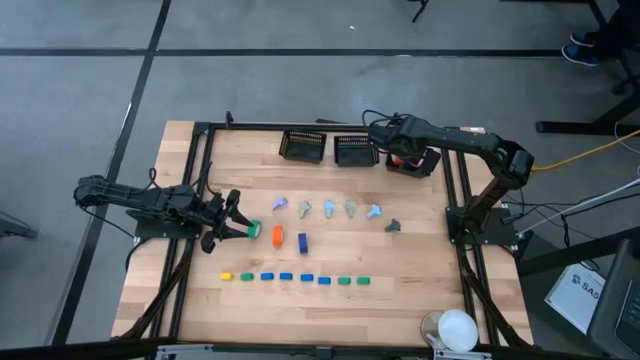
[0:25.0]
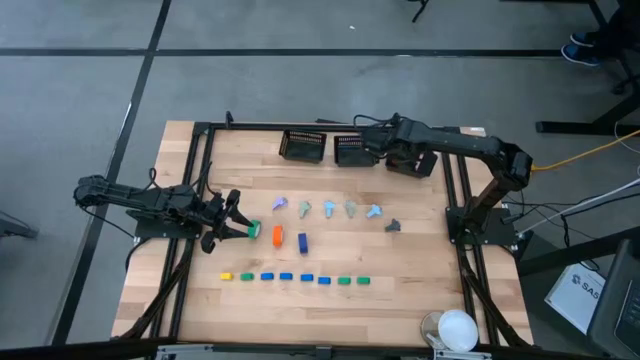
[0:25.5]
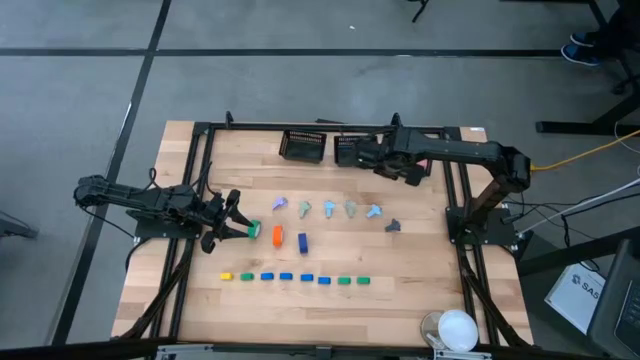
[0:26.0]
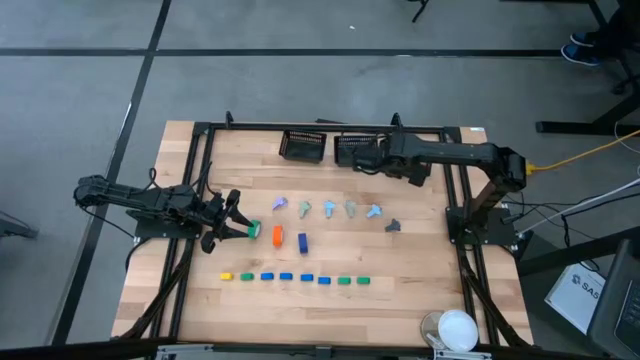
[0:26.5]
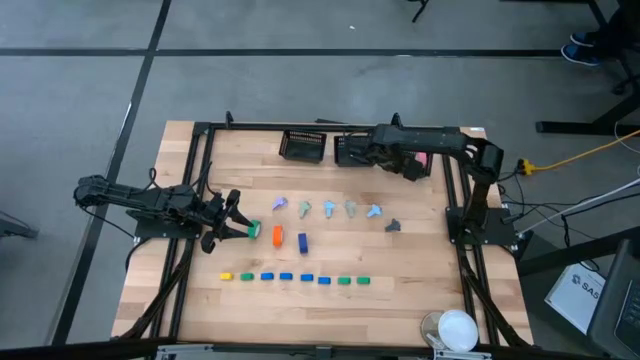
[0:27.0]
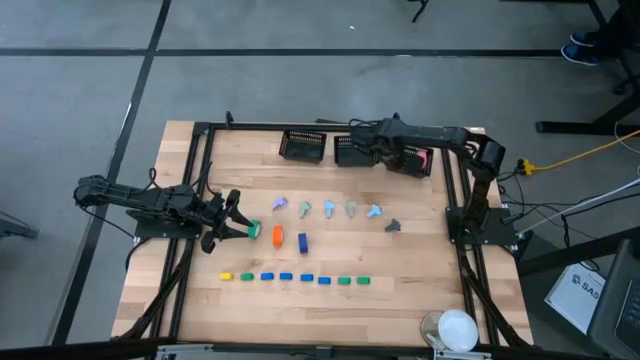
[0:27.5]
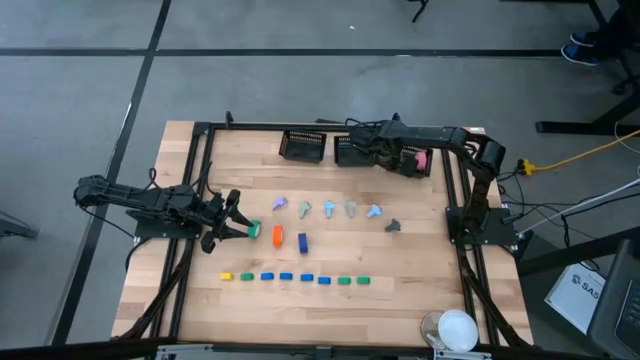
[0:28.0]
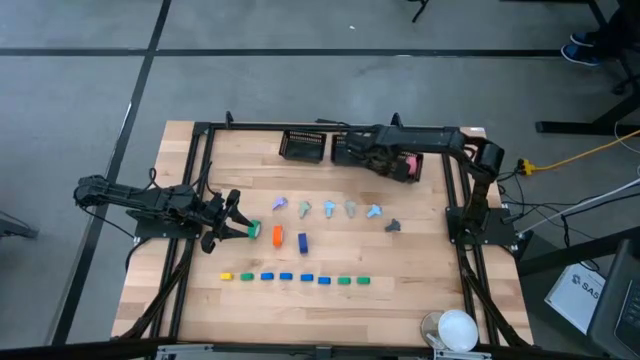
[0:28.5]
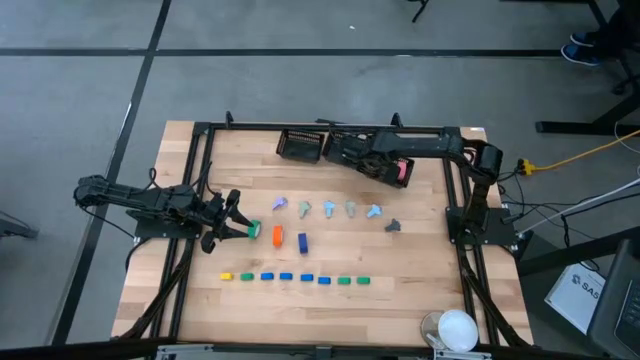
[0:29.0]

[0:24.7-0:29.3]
Task: Pick and place Stapler, Stapler remover, tape
Adjust the right black bin on the table

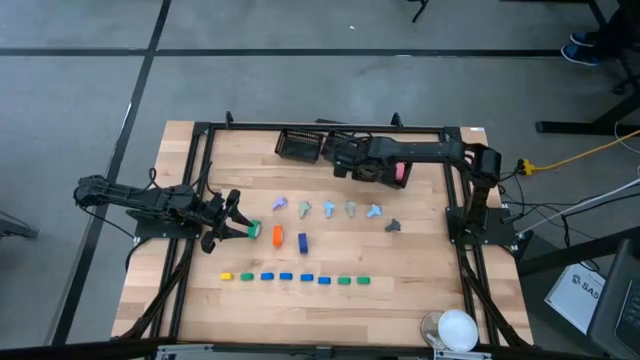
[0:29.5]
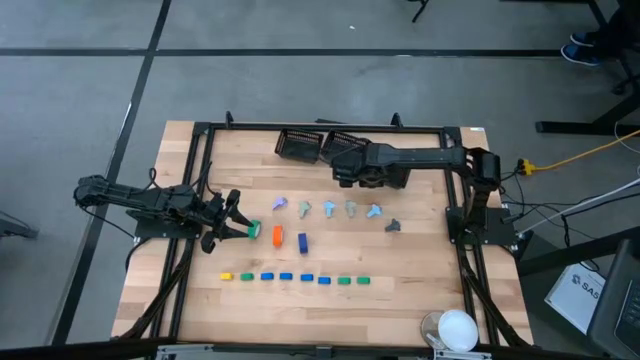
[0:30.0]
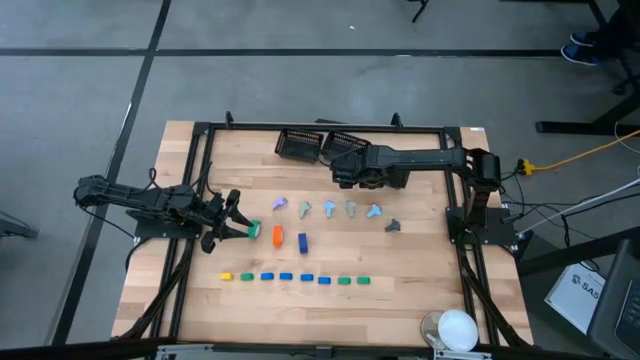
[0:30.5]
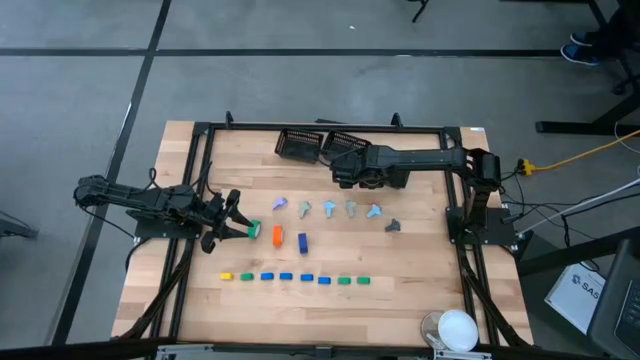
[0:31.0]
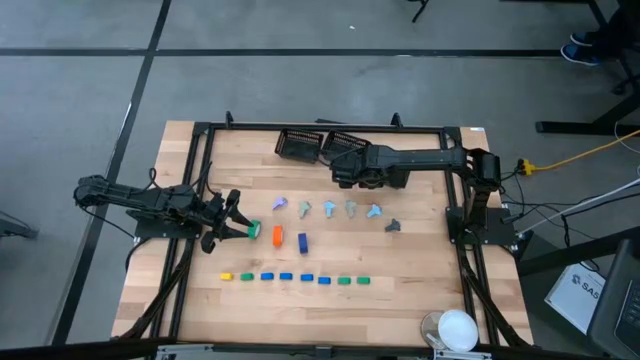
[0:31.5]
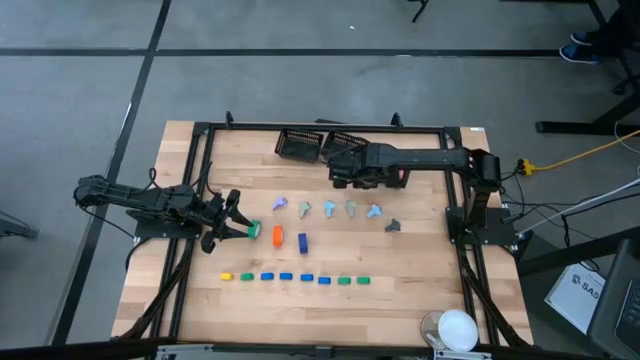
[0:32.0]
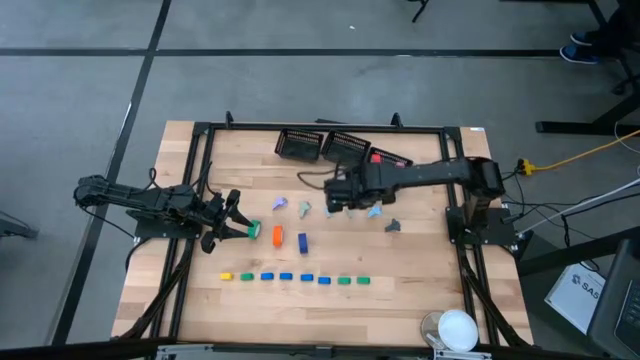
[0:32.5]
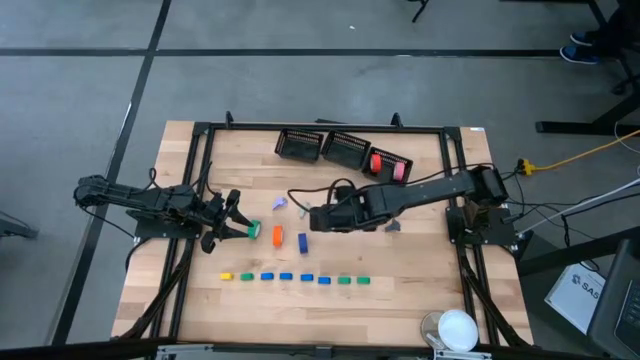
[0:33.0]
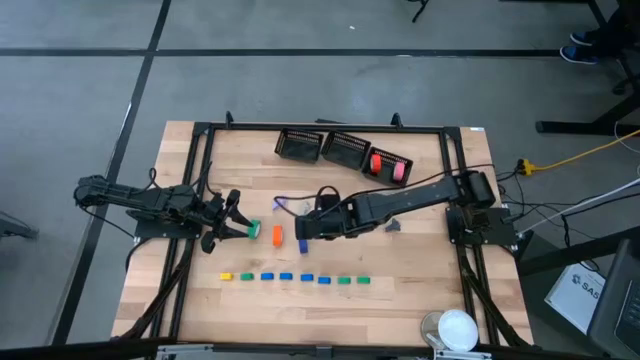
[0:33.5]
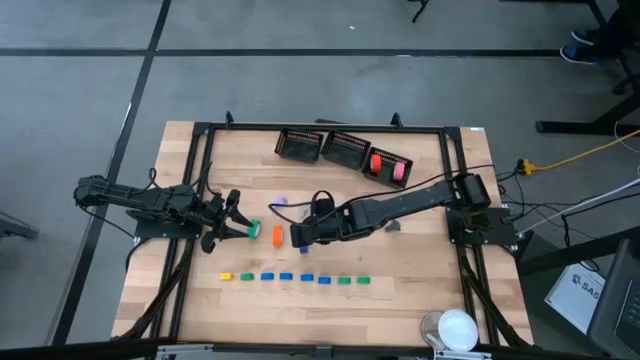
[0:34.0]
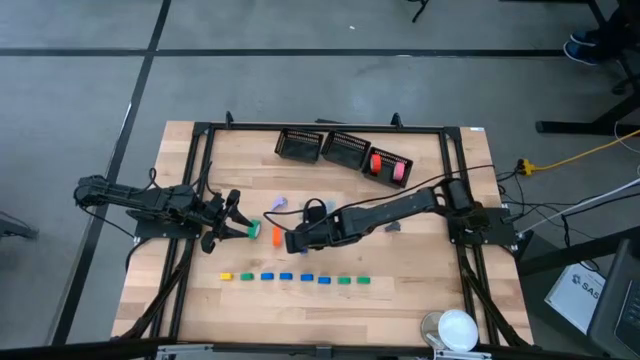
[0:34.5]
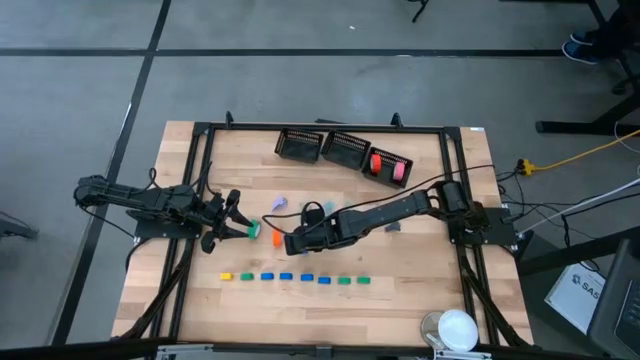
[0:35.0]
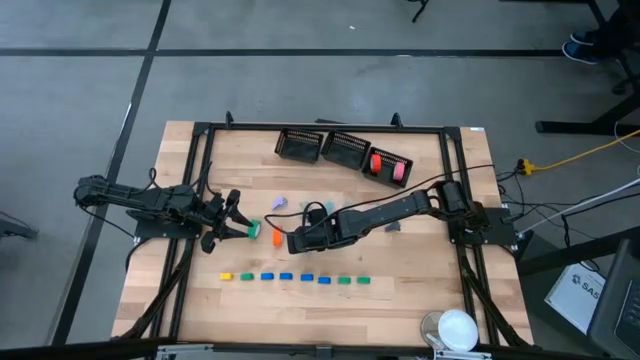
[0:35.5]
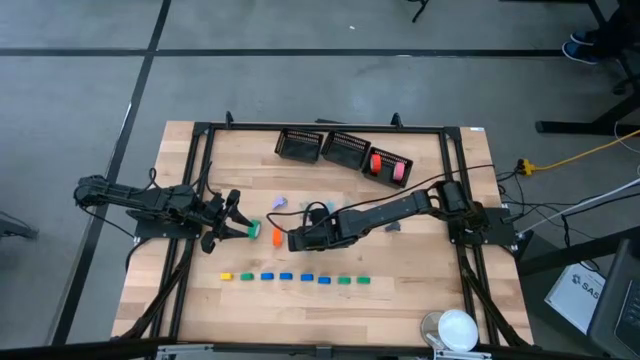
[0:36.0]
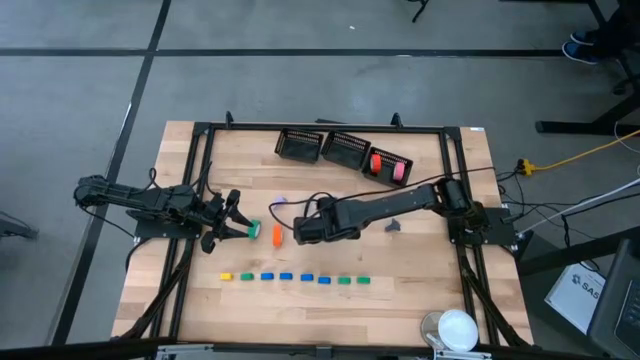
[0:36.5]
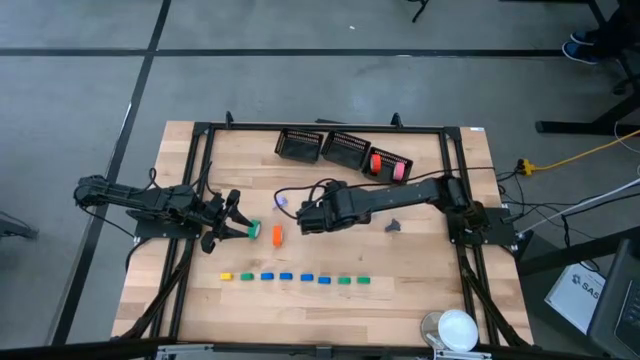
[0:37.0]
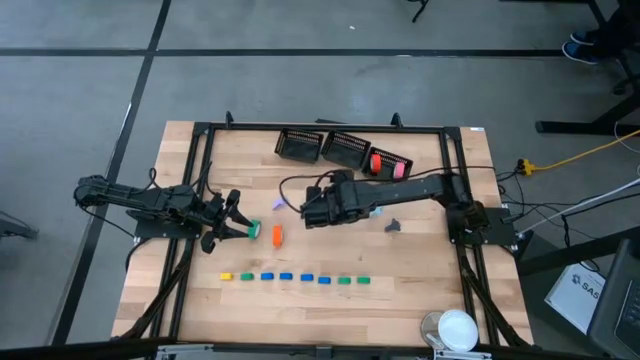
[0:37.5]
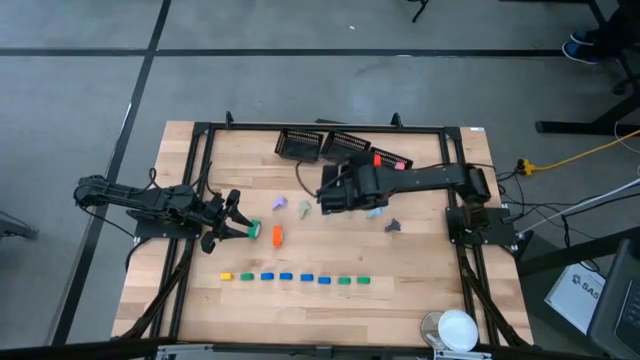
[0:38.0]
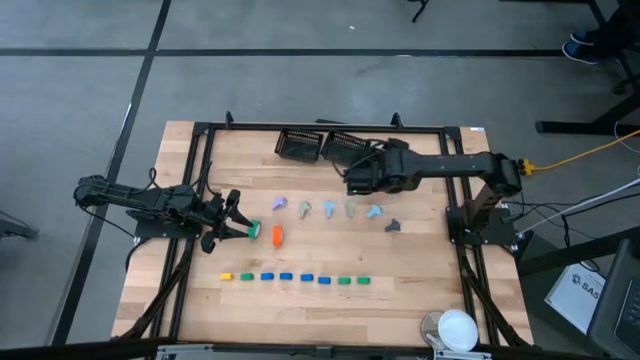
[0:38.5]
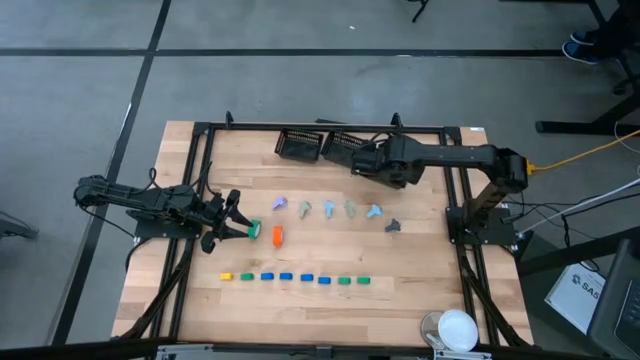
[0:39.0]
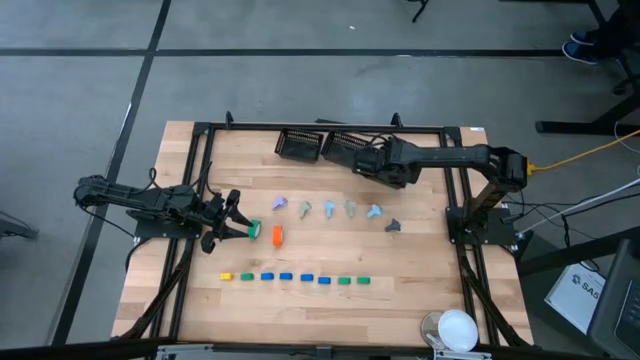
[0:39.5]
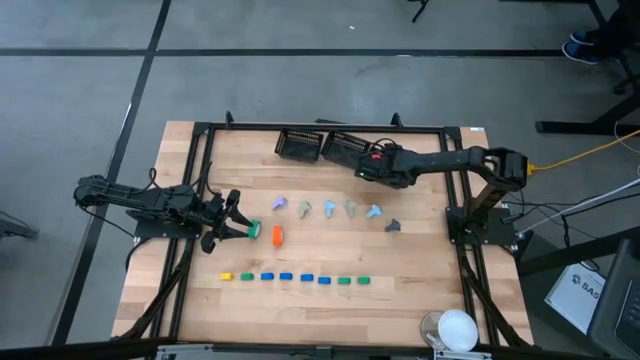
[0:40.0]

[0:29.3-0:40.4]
Put the blue tape into the right black bin

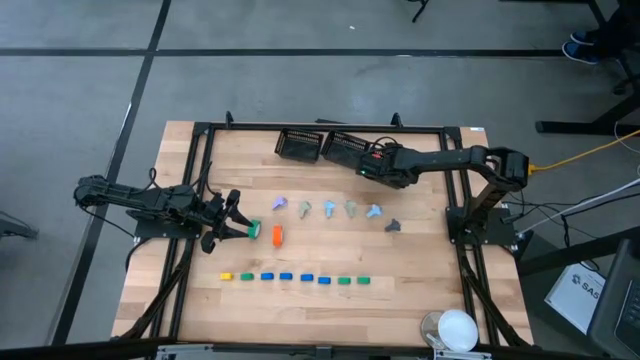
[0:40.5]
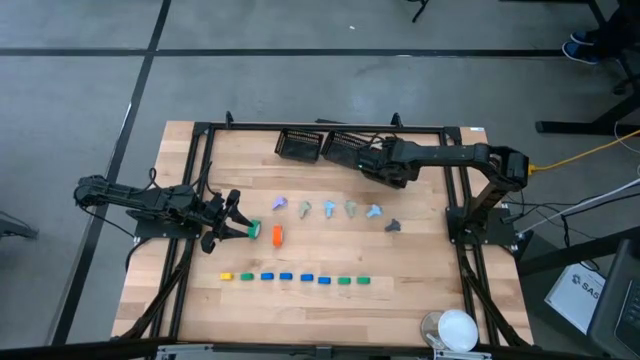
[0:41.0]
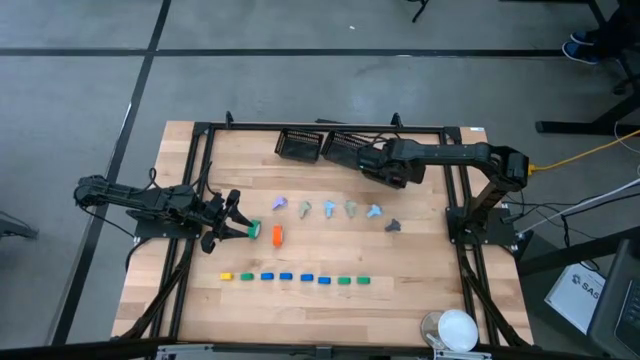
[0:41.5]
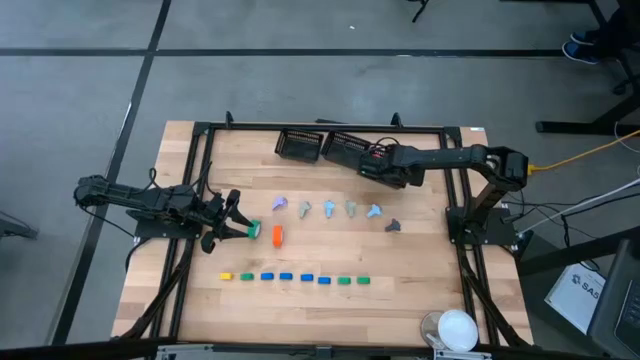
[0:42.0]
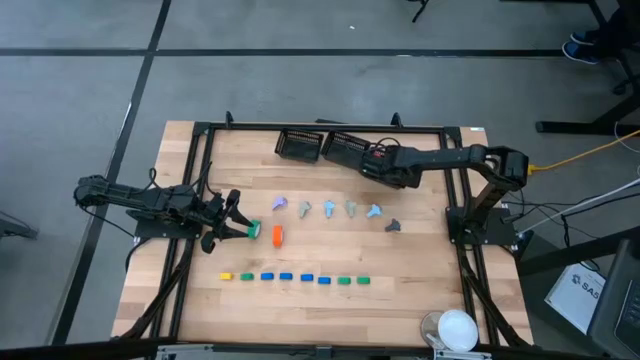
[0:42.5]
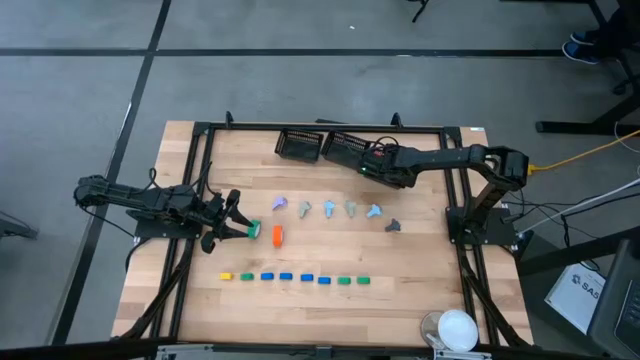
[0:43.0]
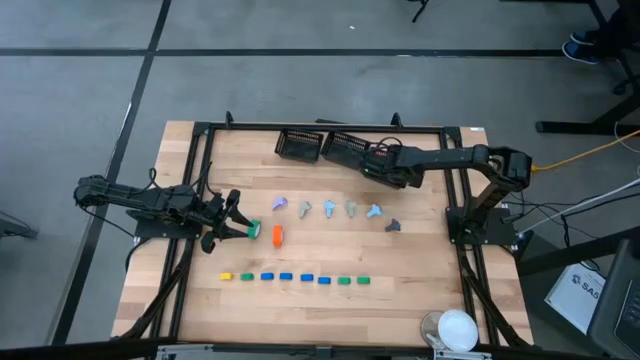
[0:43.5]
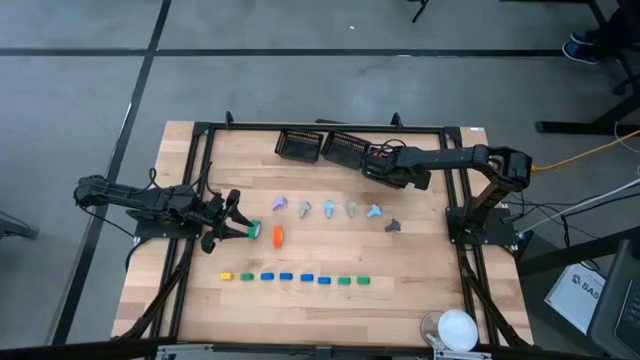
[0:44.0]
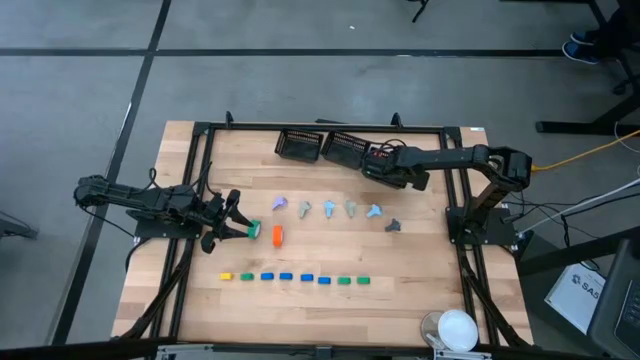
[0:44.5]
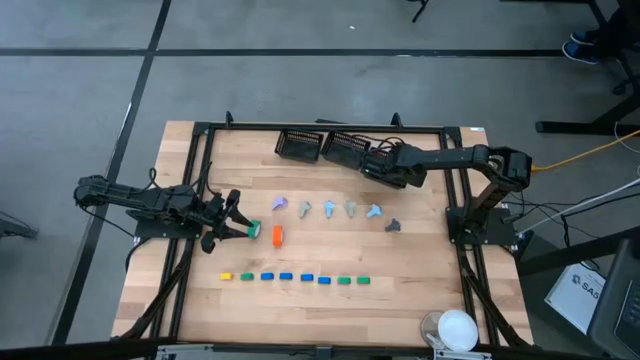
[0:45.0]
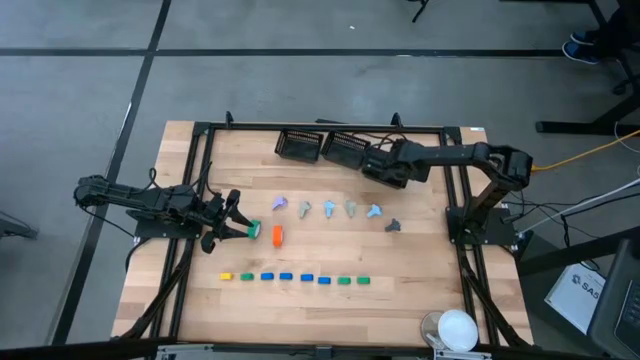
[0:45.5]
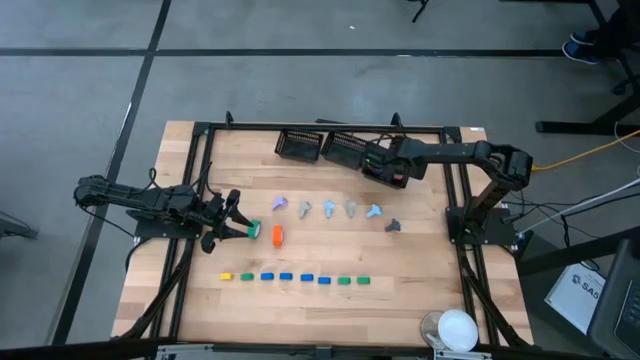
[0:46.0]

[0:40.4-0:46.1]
Adjust the tapes in the right black bin

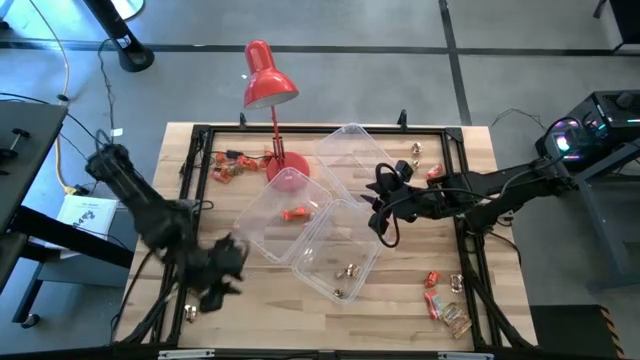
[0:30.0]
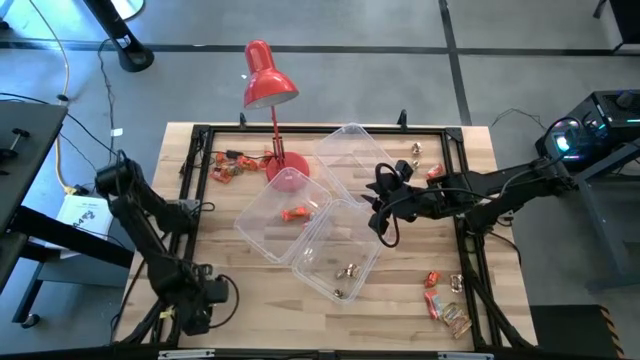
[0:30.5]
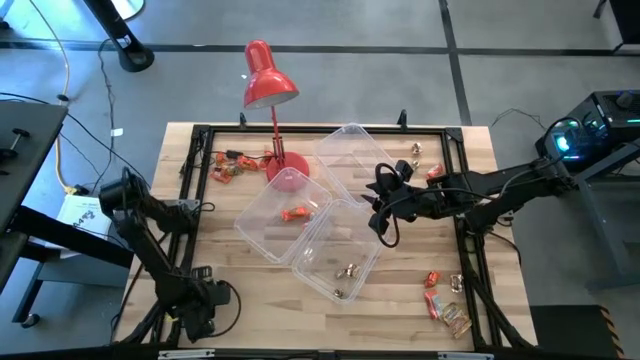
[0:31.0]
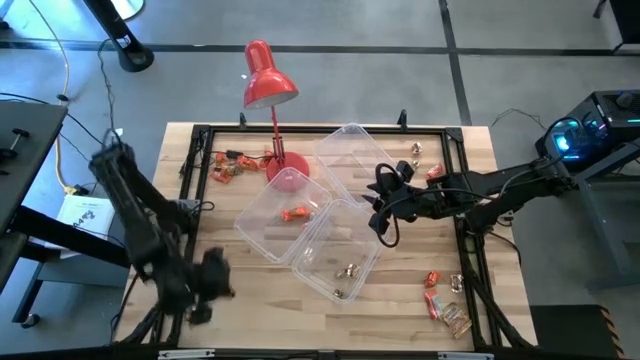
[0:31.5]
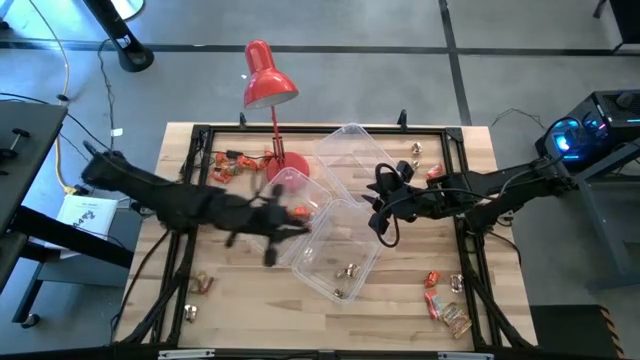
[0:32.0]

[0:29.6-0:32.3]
Task: Sort candy
Put the gold candy into the bottom left transparent bin
